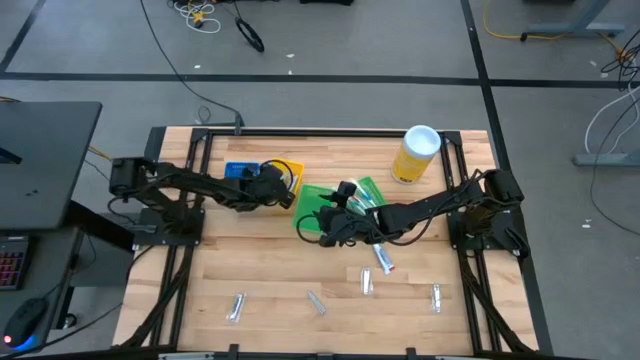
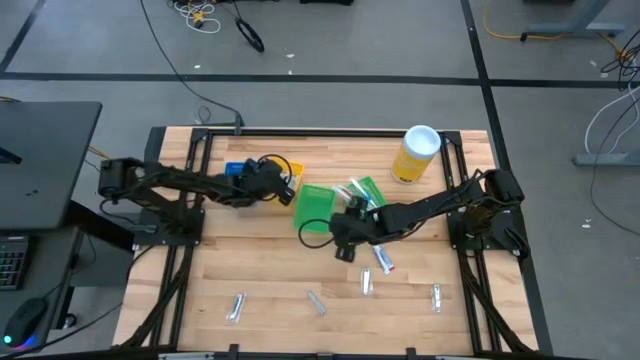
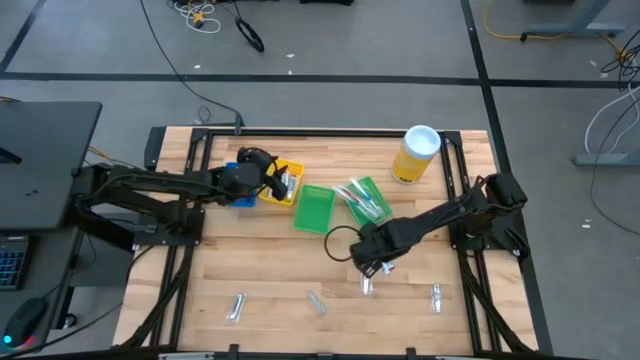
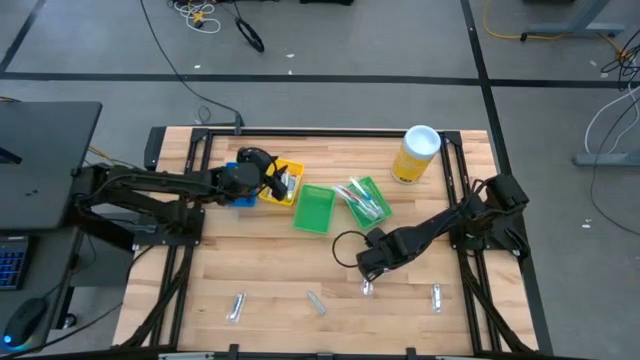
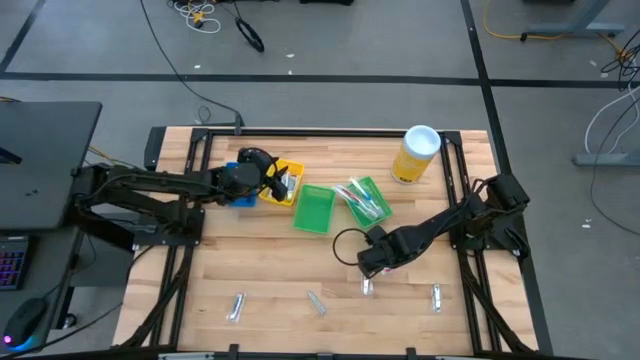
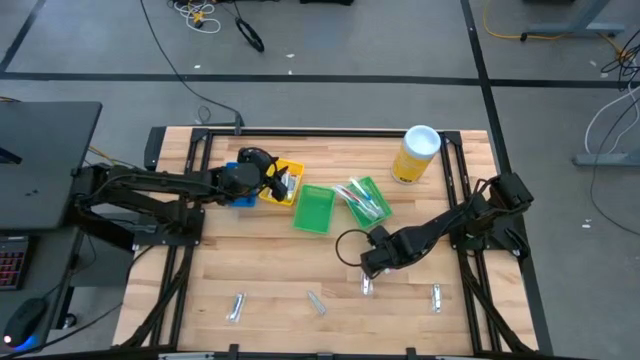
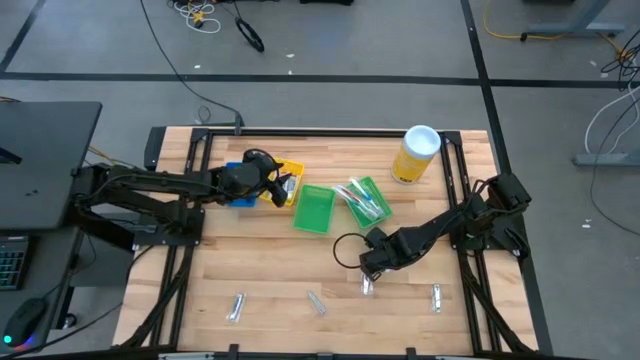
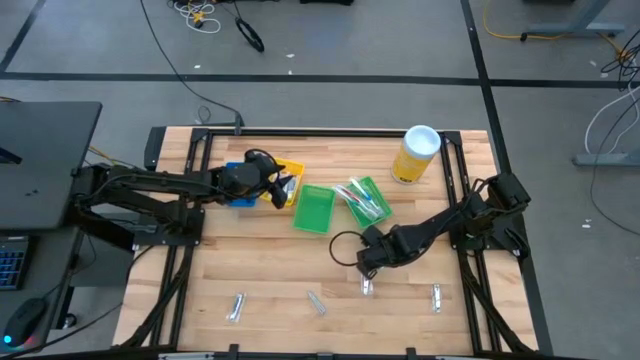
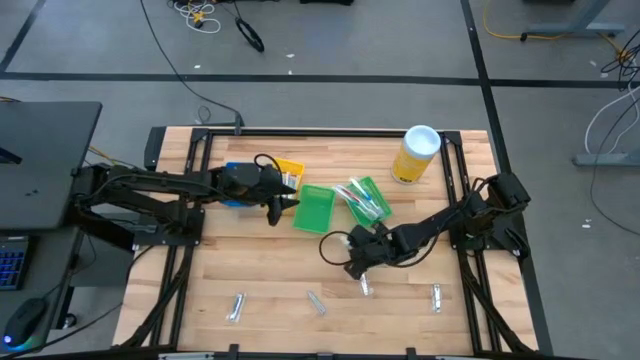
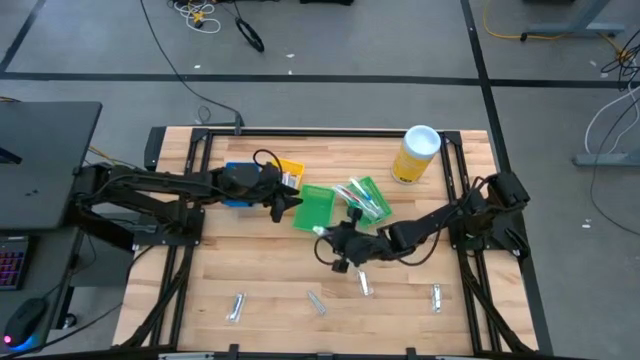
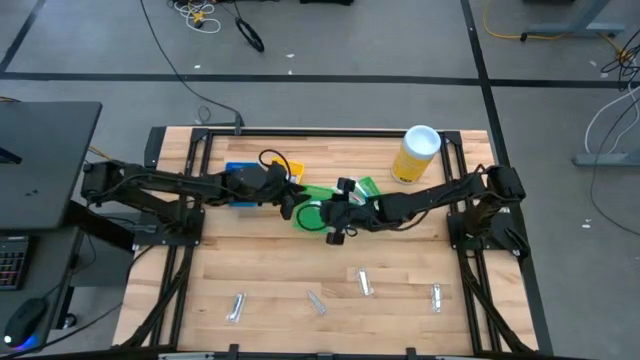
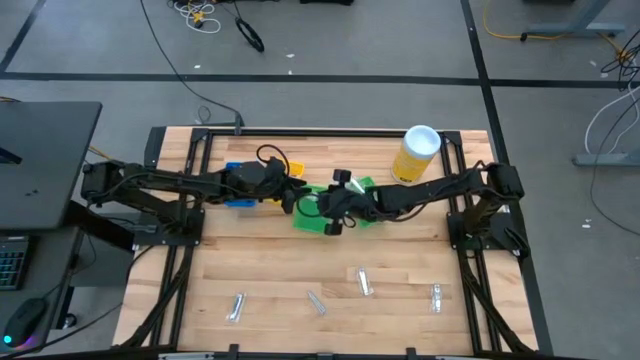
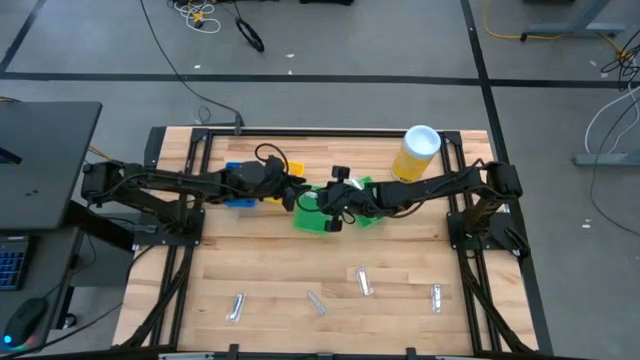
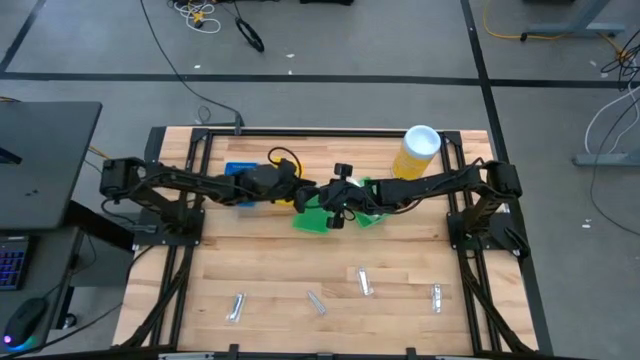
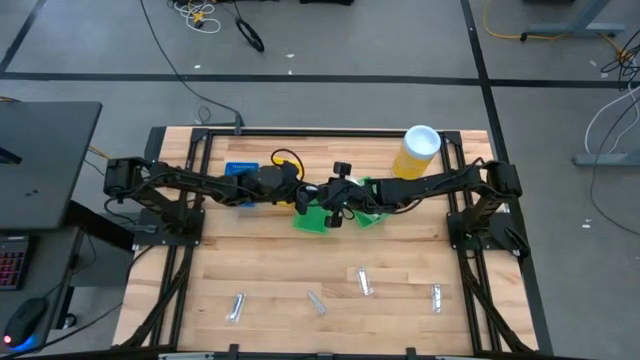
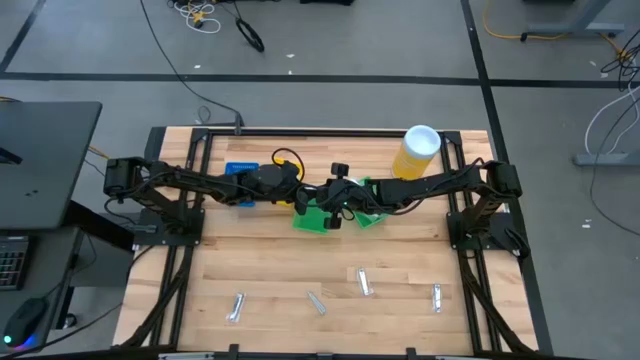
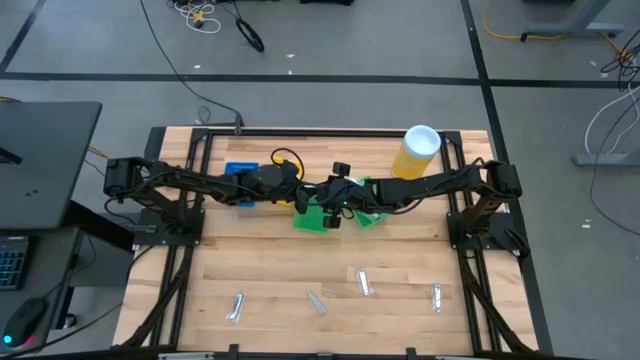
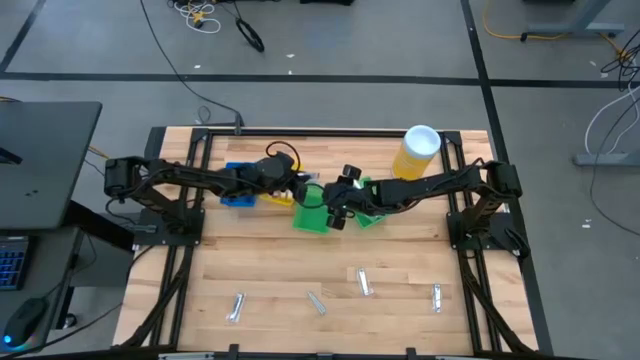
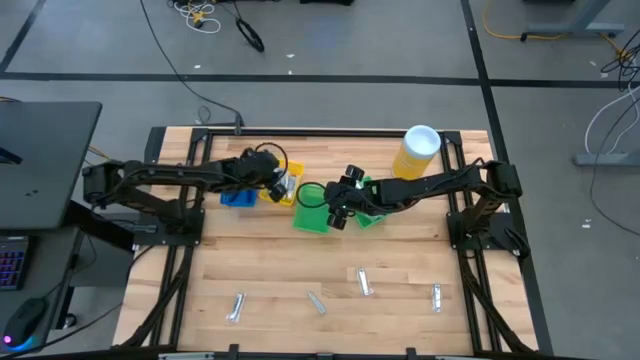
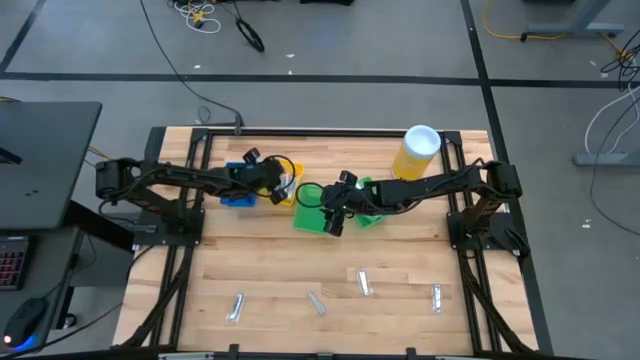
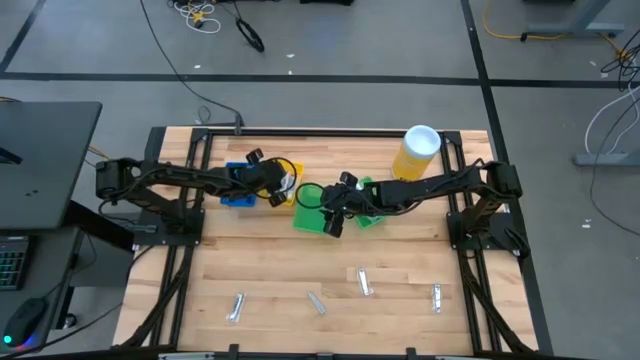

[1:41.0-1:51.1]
Task: Pick & Place Travel size toiletries
Put the white toothpaste into the yellow bin

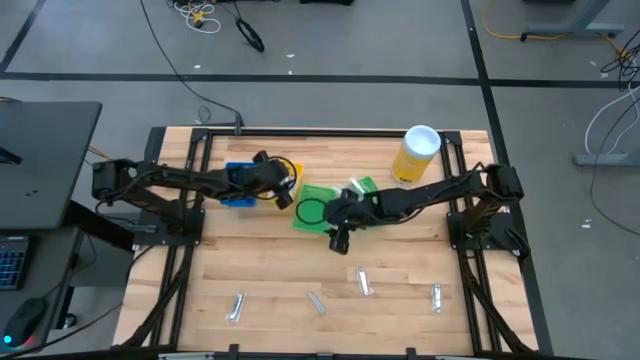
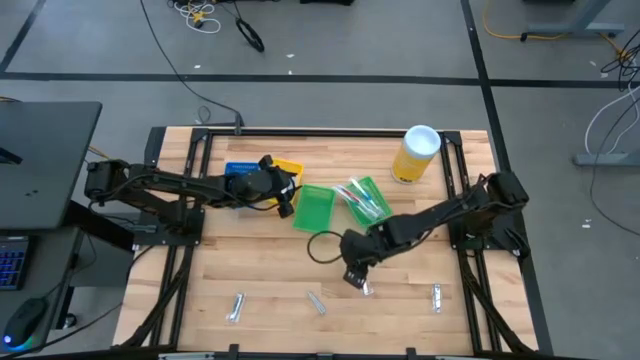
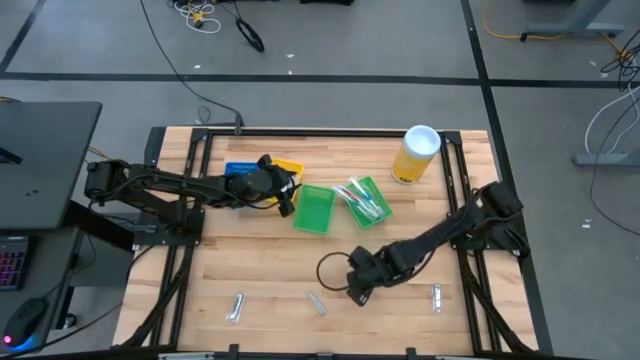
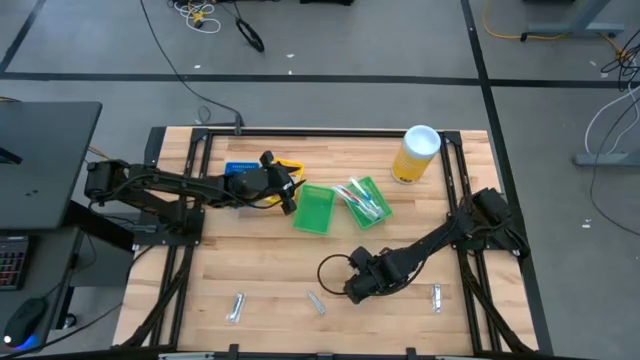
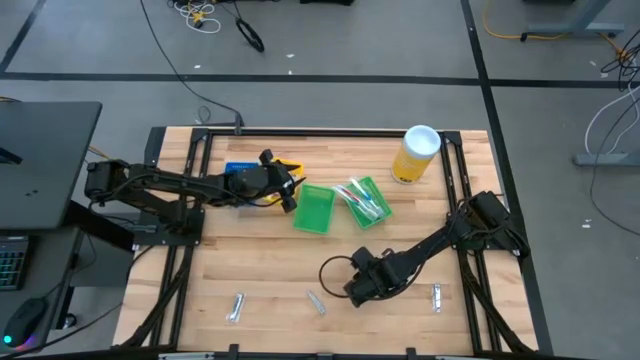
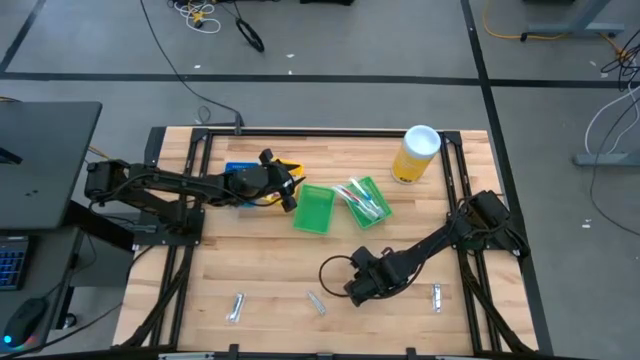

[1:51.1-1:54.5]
Put the silver nail cutter into the left green bin

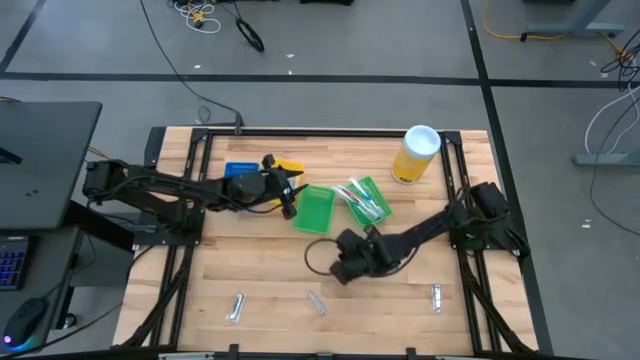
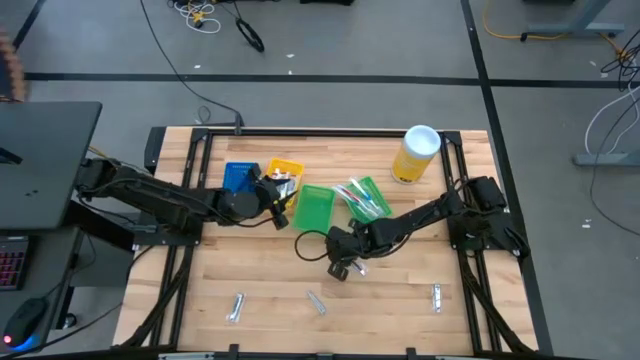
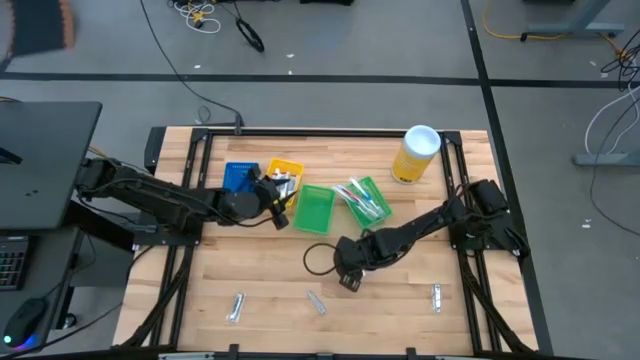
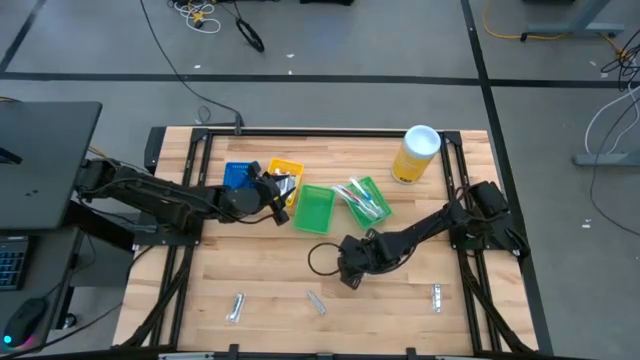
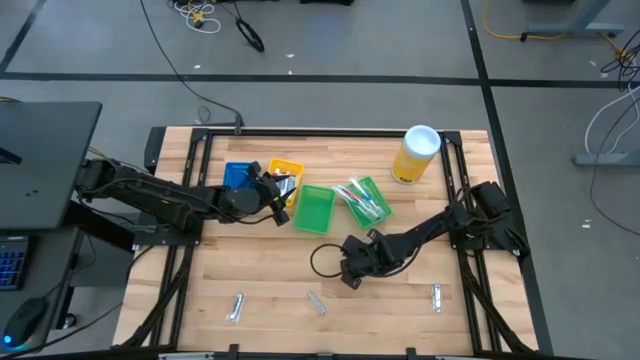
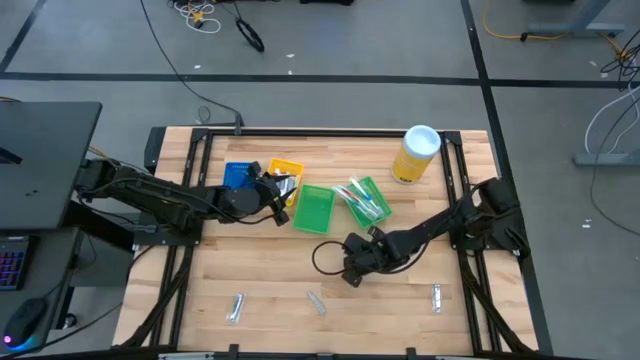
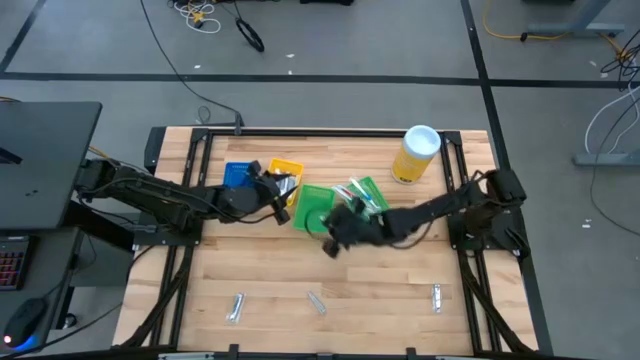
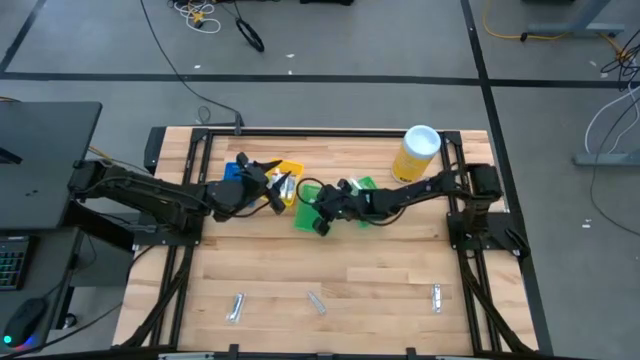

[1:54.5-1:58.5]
Put the silver nail cutter into the left green bin

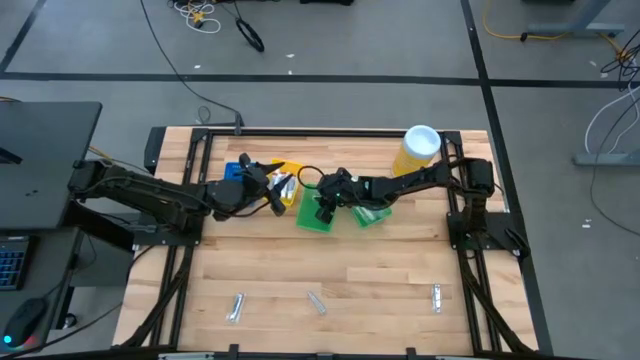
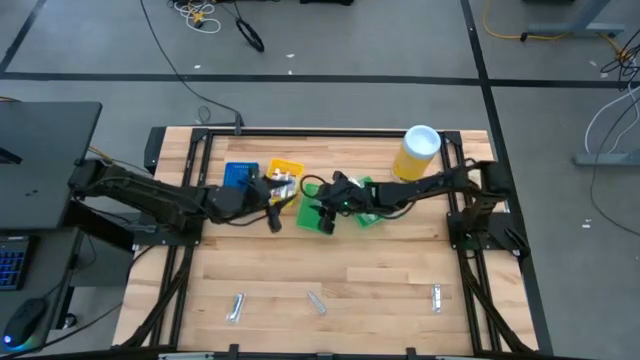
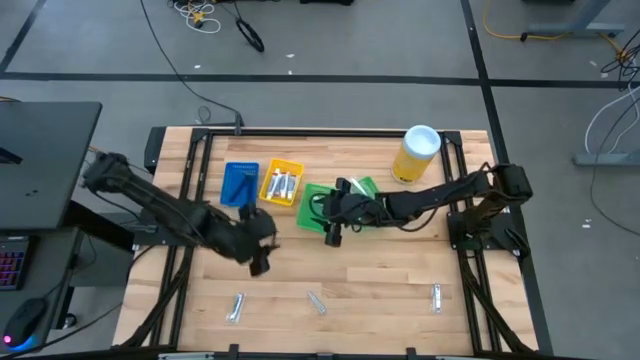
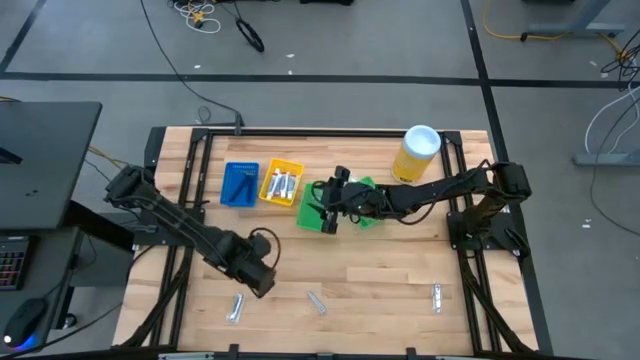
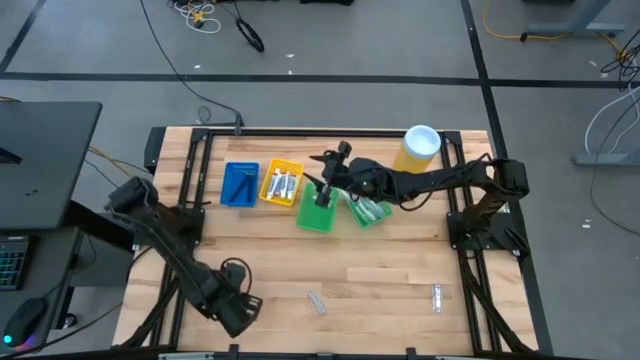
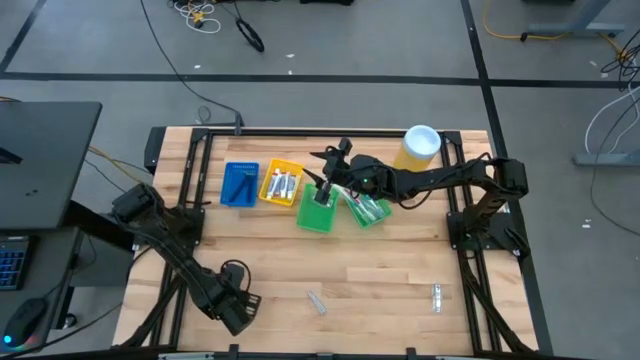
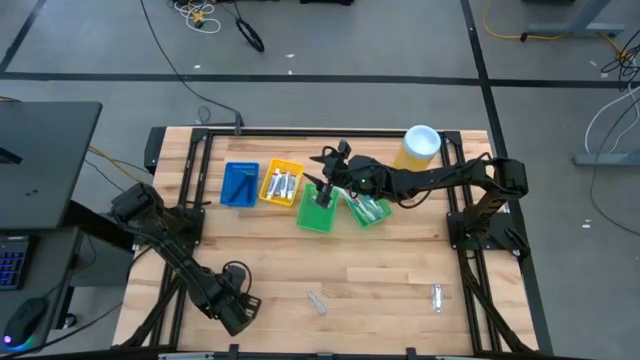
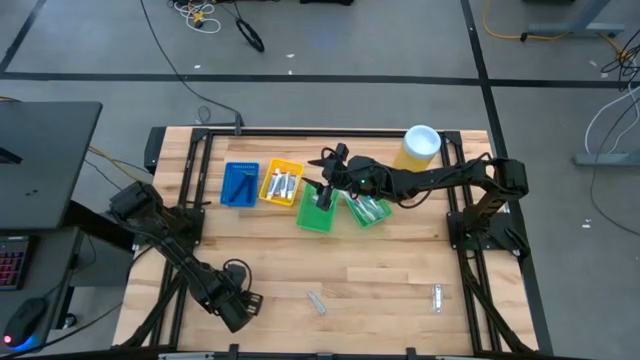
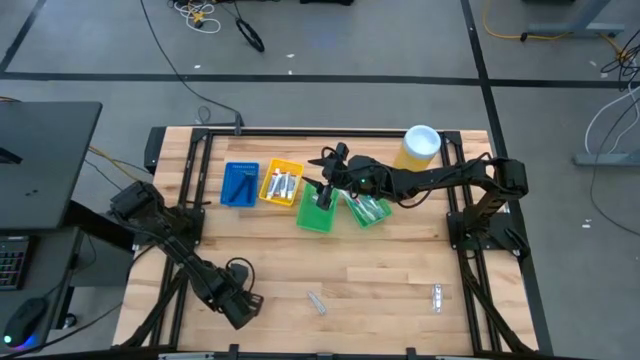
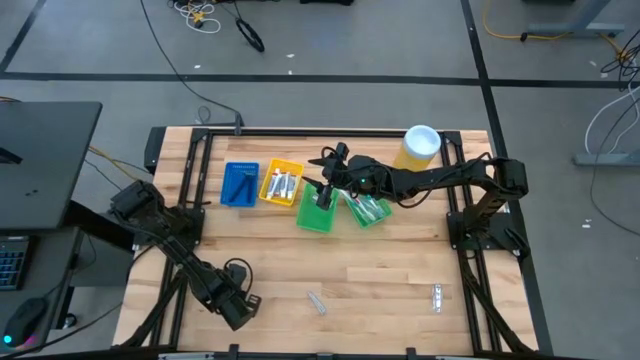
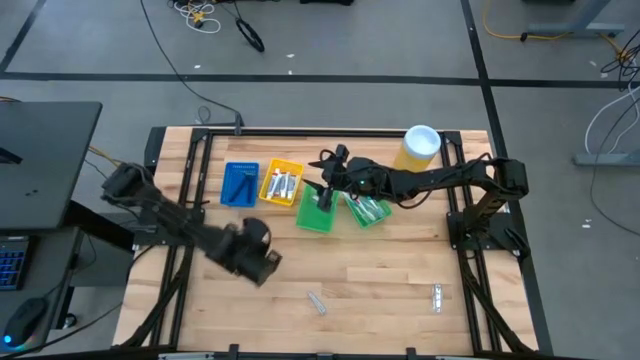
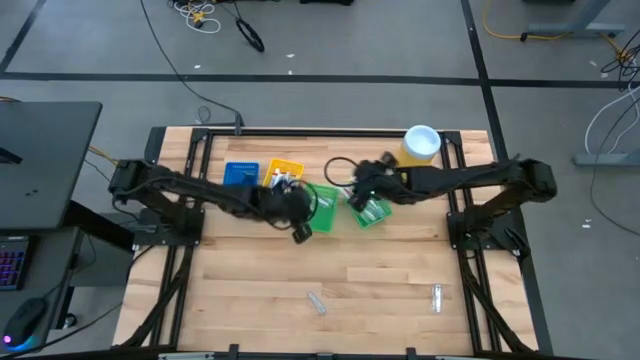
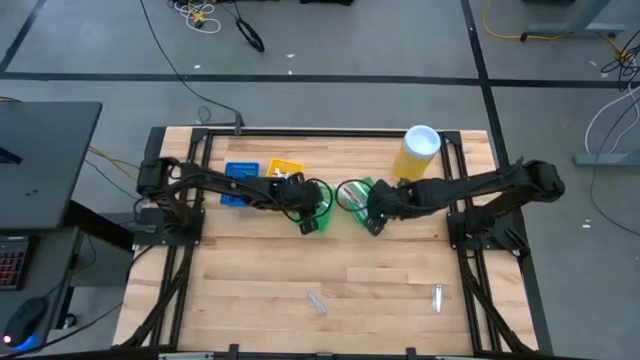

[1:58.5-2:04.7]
Put the silver nail cutter into the left green bin
